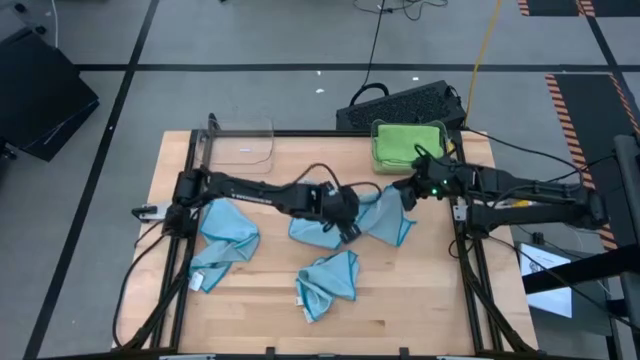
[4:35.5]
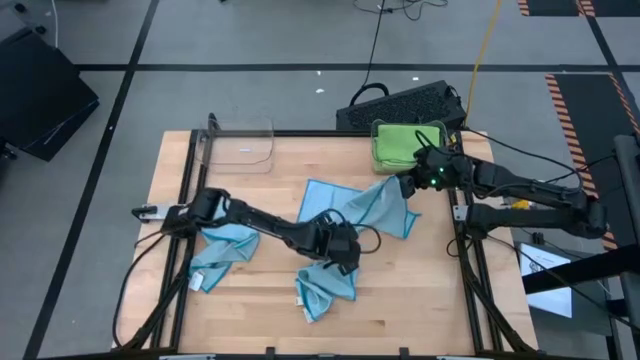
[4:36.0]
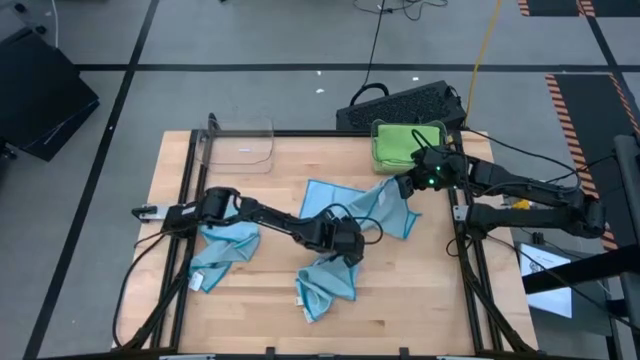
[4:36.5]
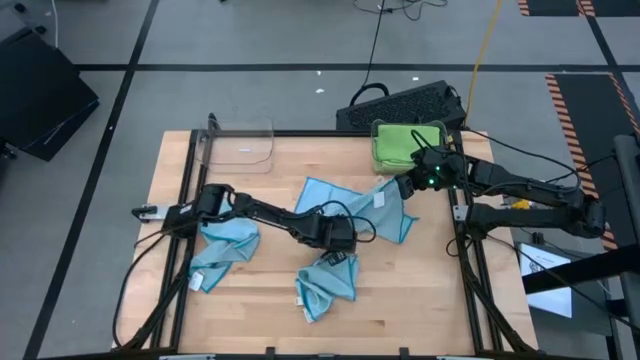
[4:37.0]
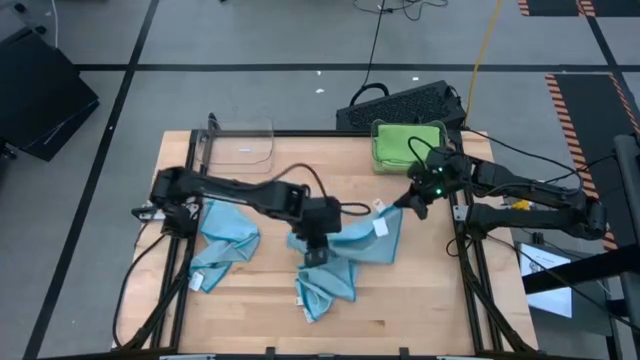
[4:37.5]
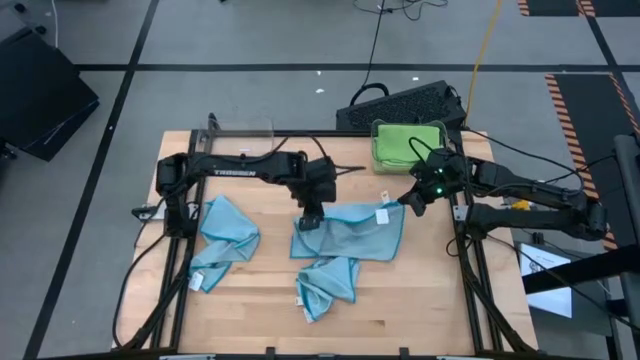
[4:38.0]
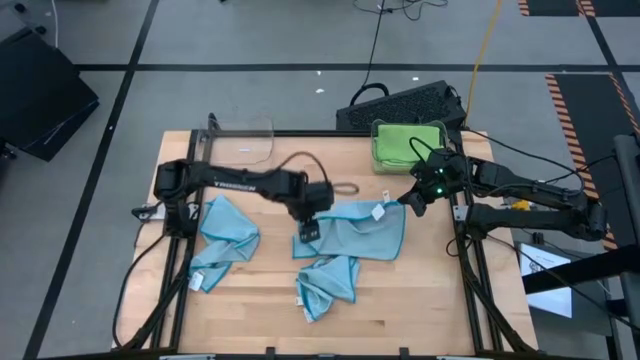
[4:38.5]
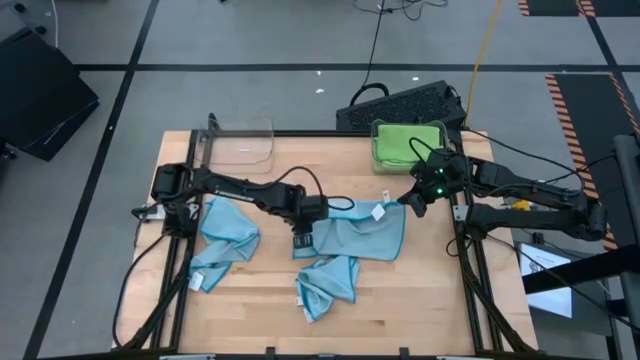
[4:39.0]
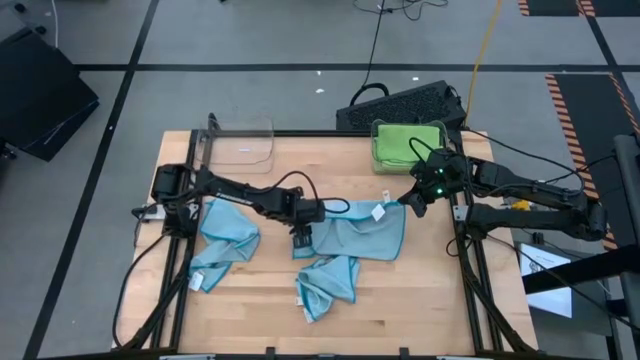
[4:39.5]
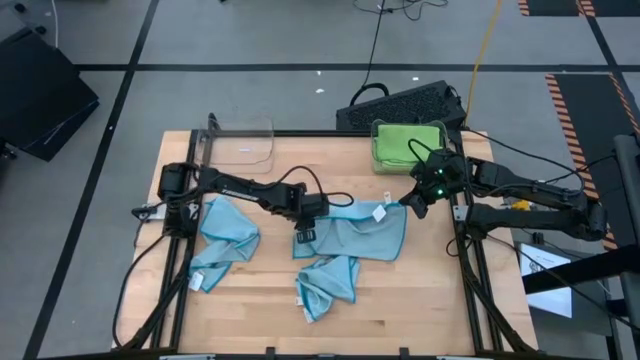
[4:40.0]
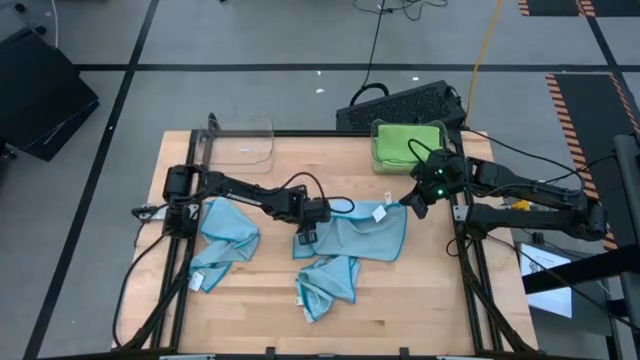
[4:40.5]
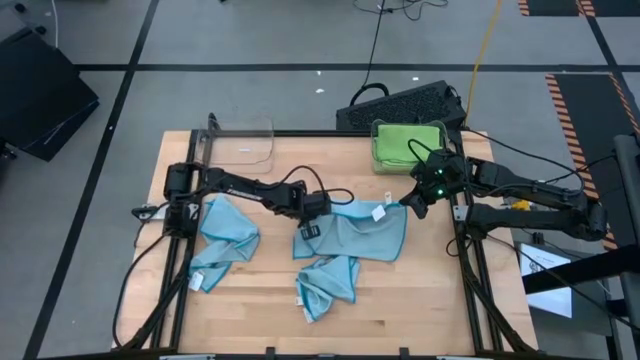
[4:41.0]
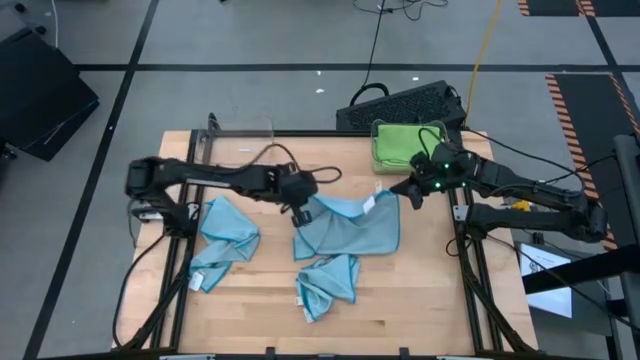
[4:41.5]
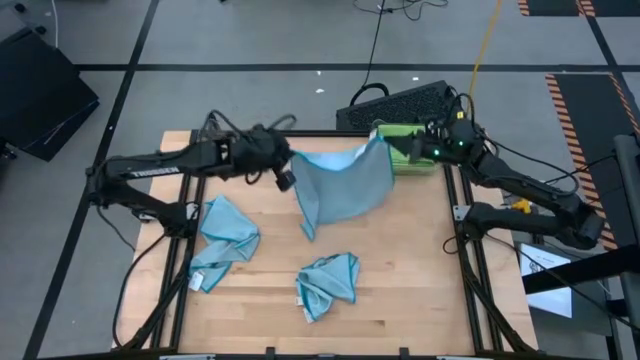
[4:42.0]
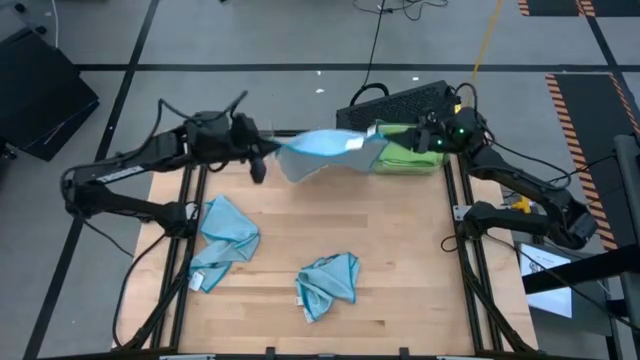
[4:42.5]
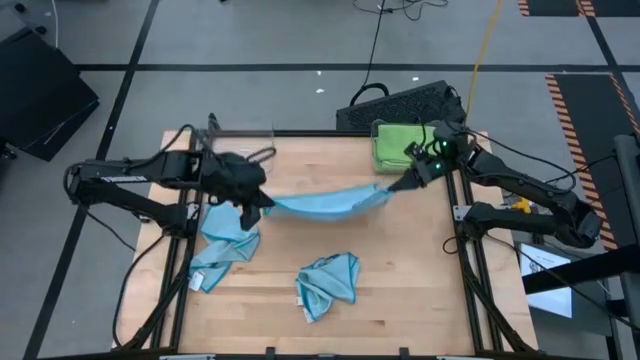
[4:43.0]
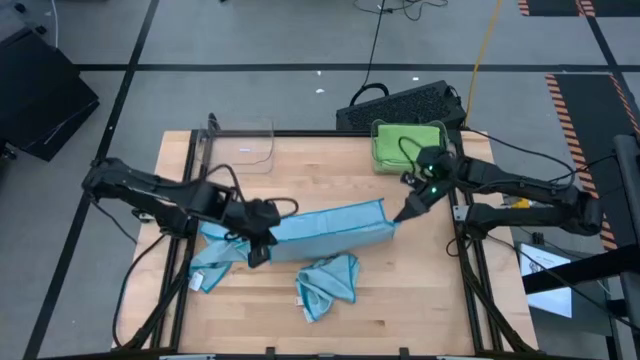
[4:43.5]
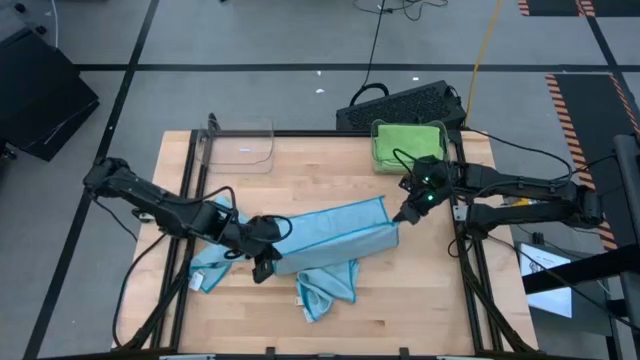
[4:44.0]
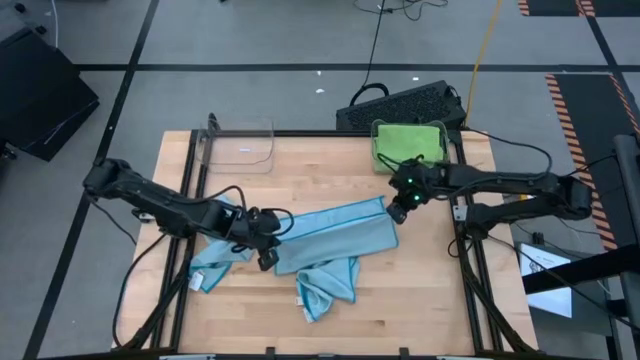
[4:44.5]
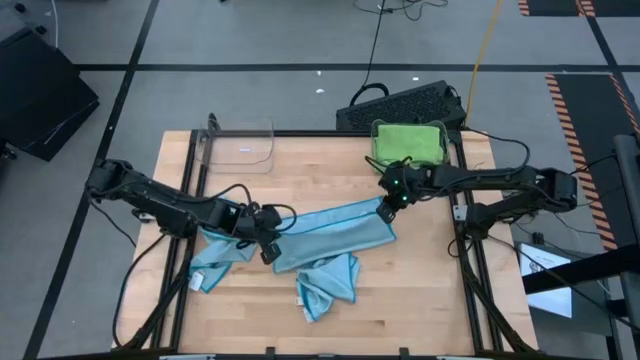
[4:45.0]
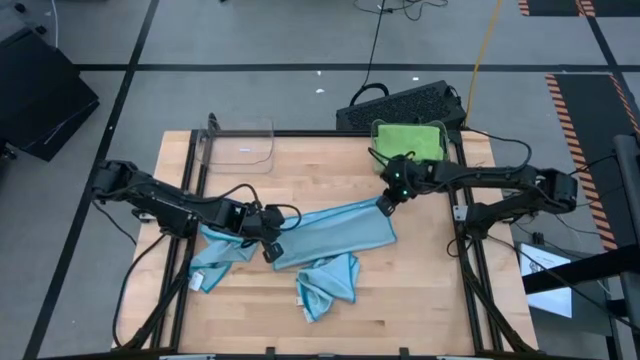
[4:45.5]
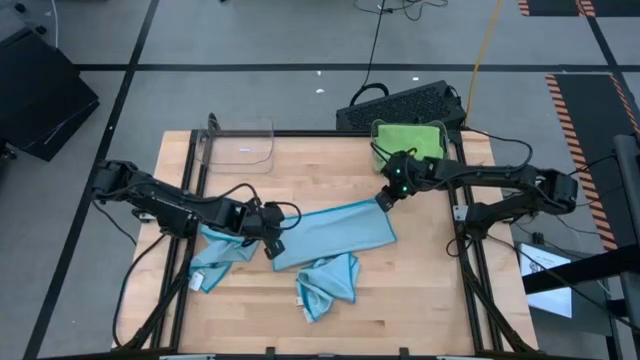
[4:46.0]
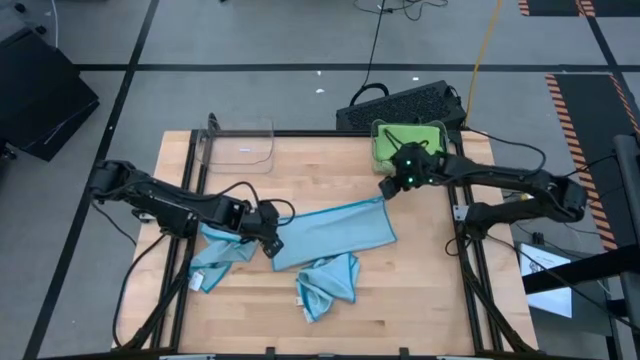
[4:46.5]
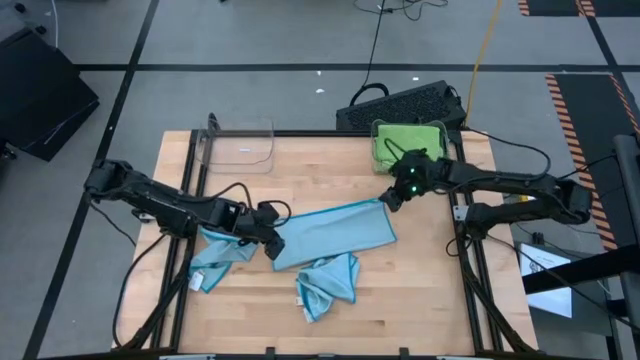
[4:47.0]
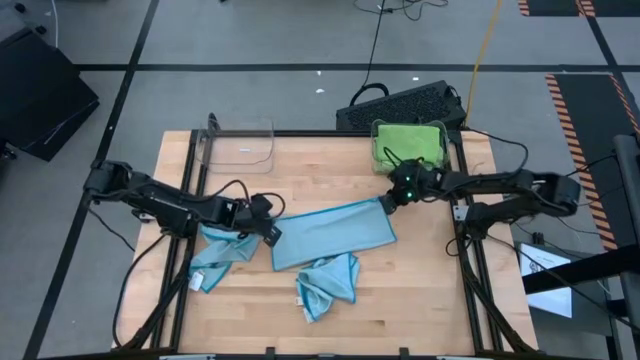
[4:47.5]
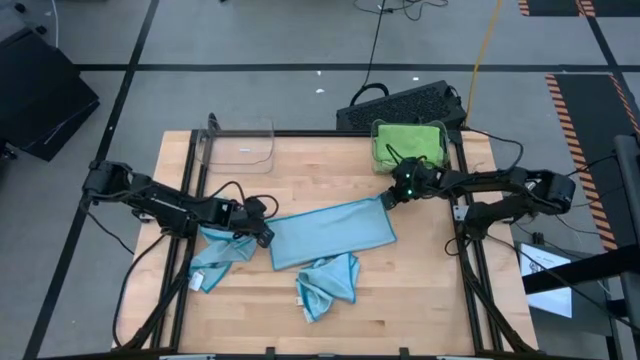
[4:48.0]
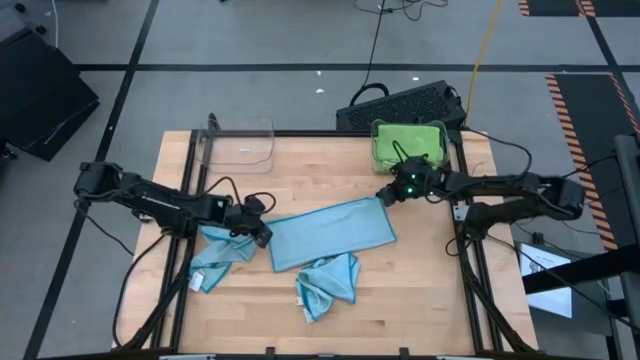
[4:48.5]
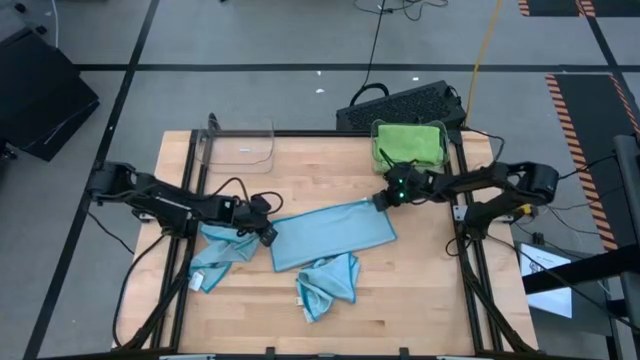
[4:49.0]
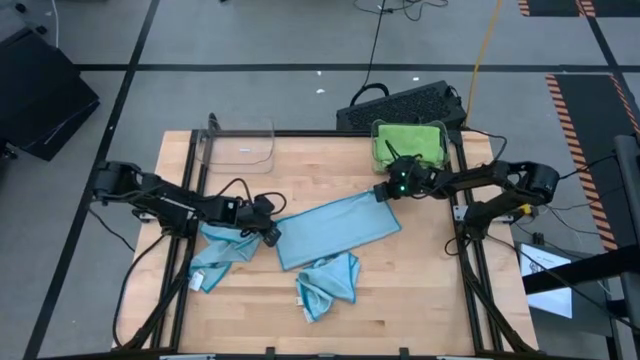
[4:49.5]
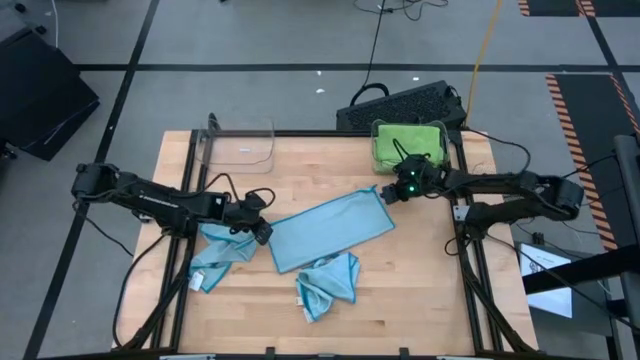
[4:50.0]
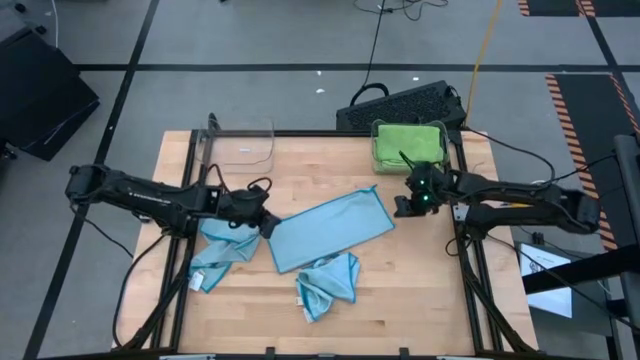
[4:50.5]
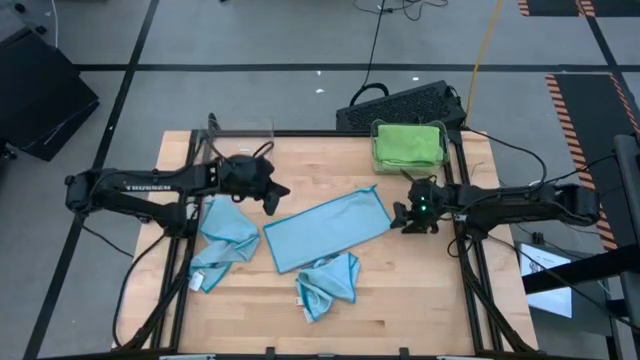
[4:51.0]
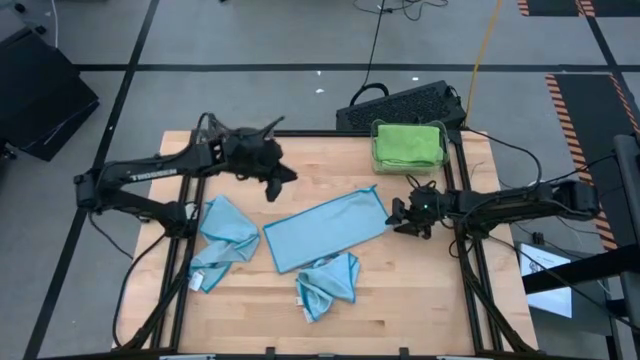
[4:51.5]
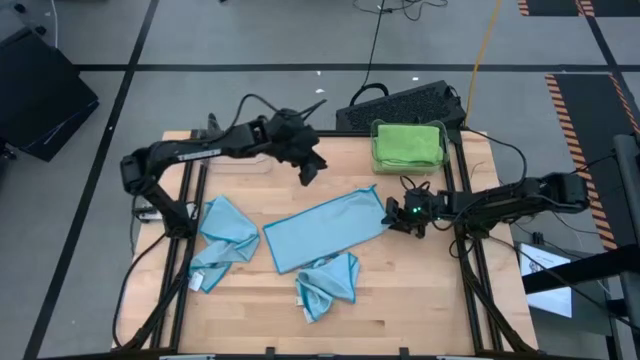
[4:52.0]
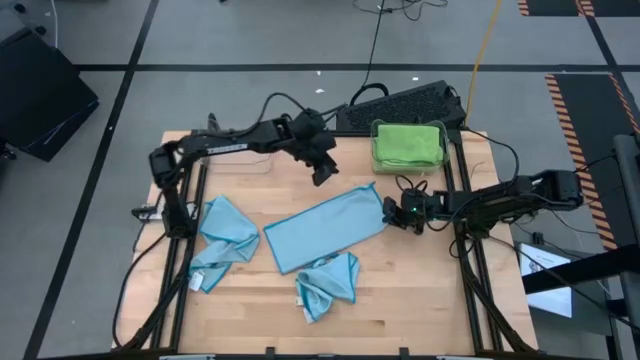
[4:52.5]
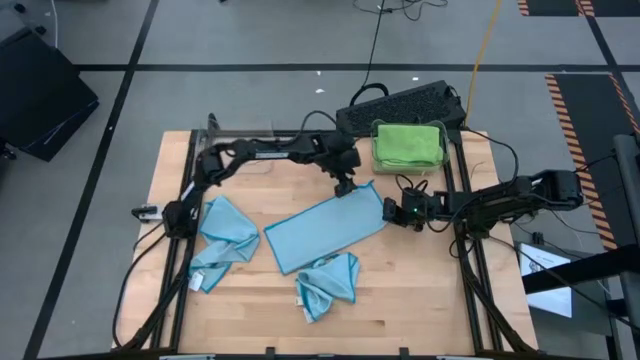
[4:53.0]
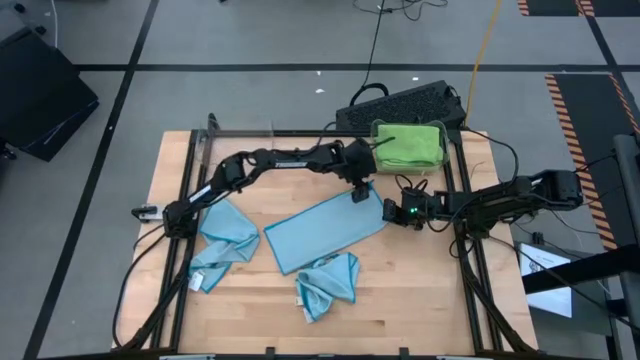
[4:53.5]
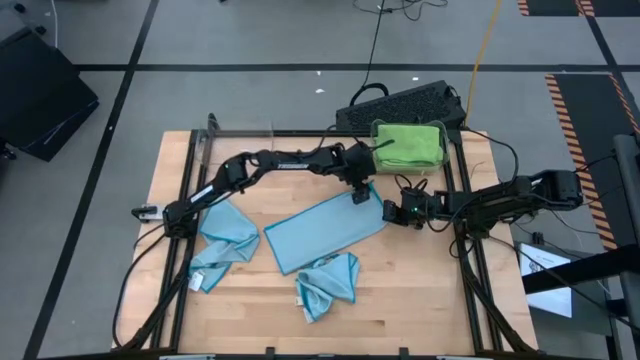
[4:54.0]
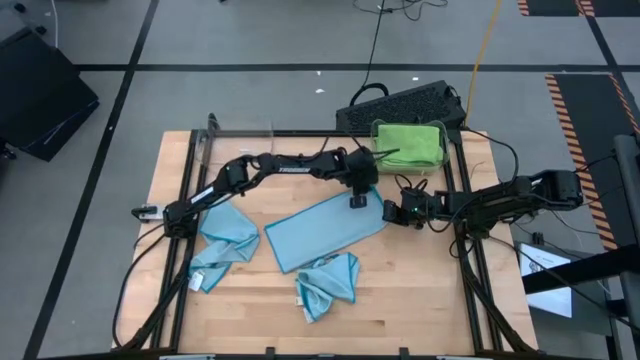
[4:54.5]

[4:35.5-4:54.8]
Task: Sort microfiber towel by color & place in baskets
Fold the top blue towel

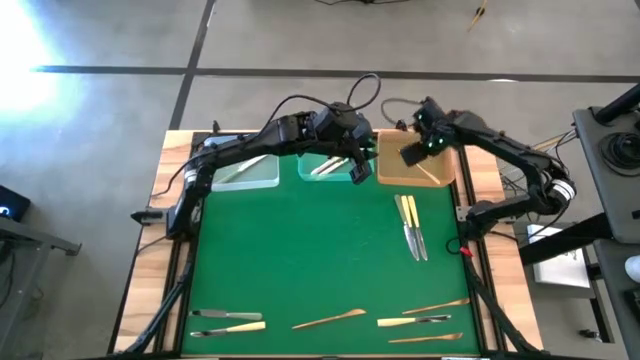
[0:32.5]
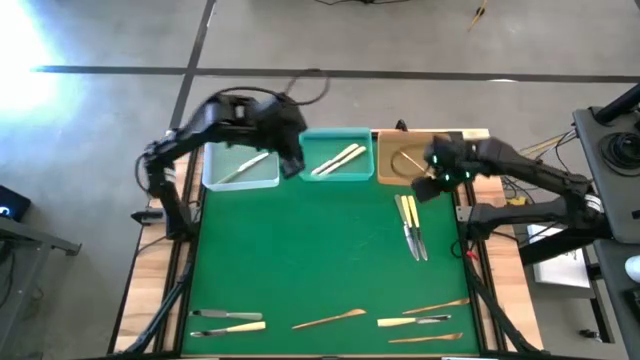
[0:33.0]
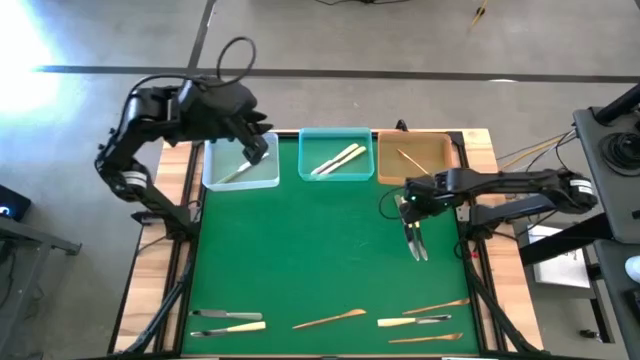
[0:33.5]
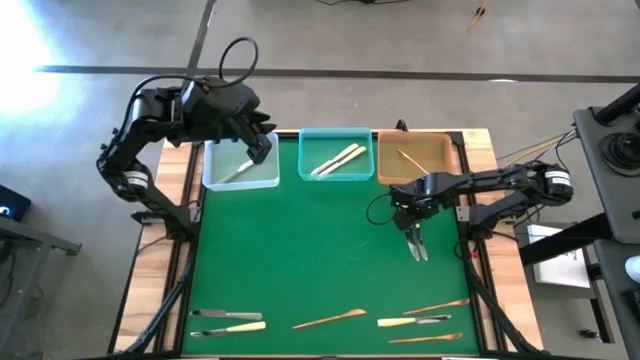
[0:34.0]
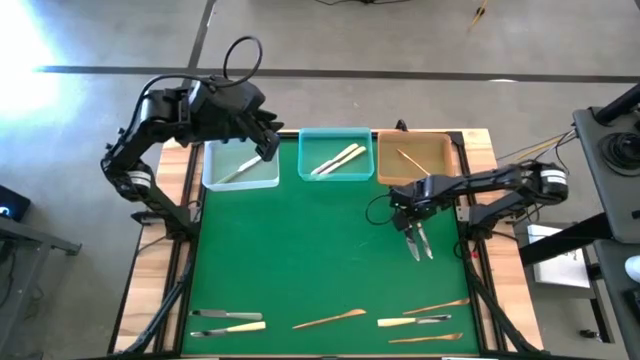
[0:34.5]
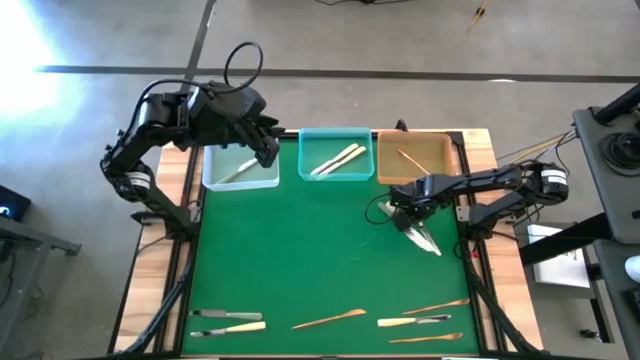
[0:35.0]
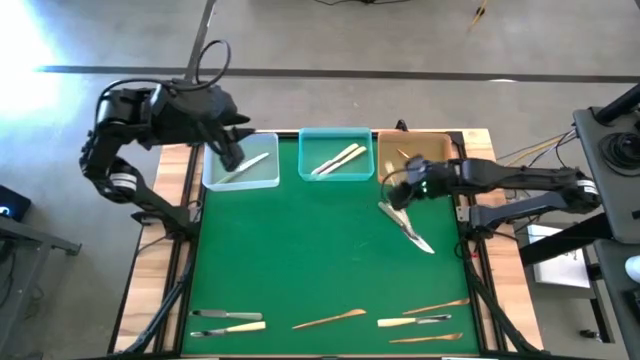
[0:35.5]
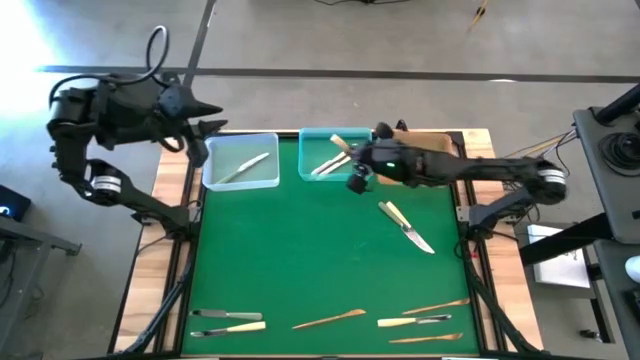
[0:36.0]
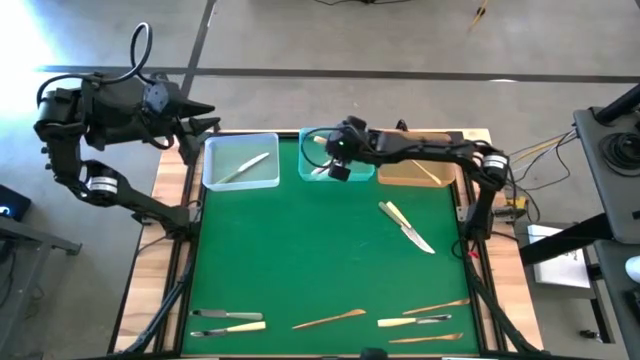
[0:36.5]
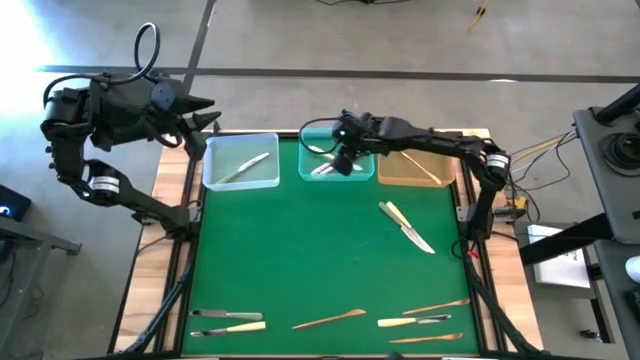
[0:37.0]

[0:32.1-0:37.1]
Task: Sort silverware by color (type)
Put the top right gold and silver knife into the blue bin
